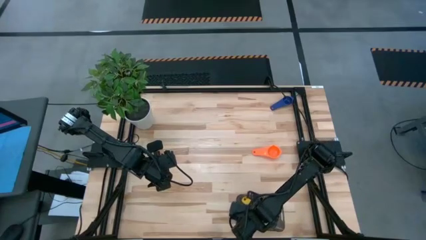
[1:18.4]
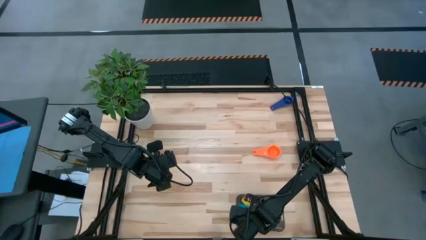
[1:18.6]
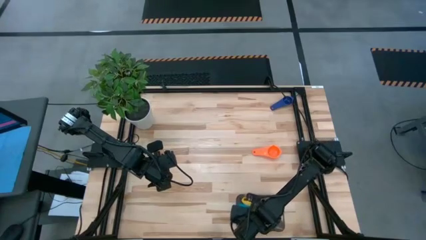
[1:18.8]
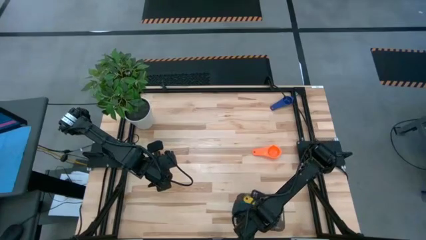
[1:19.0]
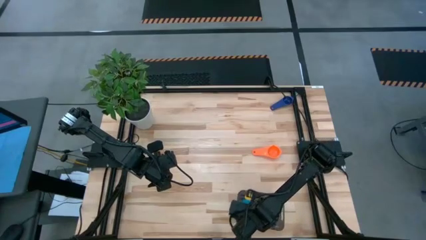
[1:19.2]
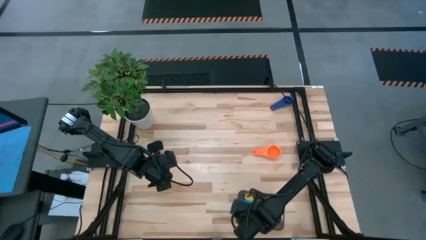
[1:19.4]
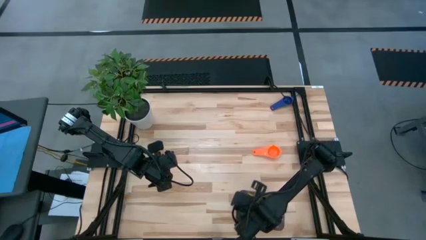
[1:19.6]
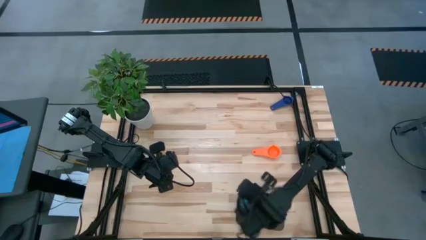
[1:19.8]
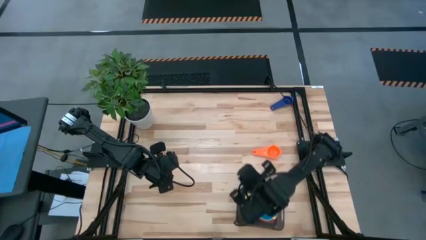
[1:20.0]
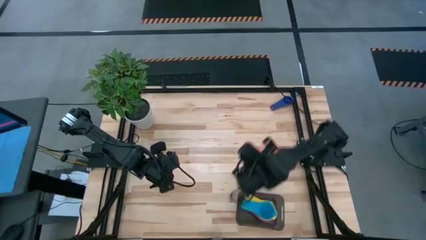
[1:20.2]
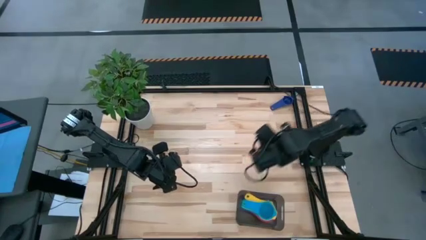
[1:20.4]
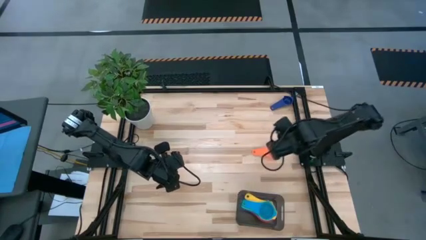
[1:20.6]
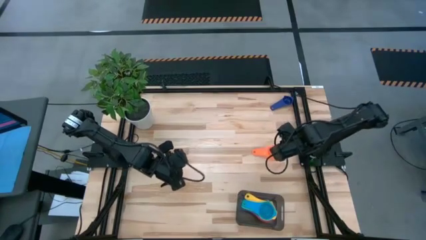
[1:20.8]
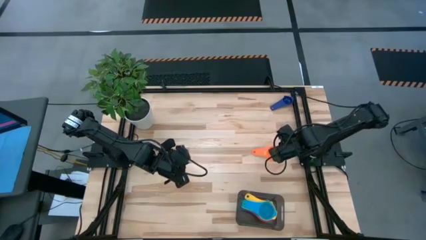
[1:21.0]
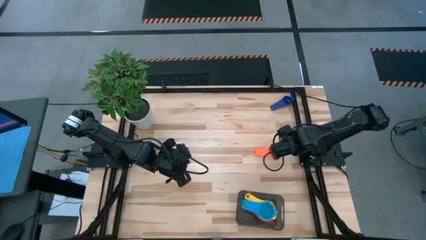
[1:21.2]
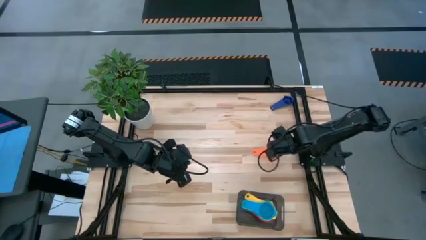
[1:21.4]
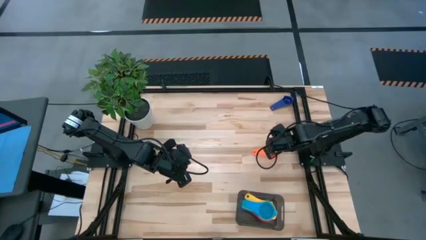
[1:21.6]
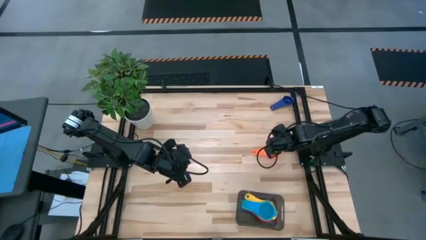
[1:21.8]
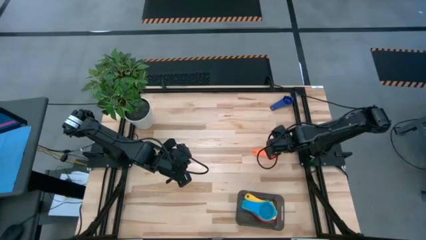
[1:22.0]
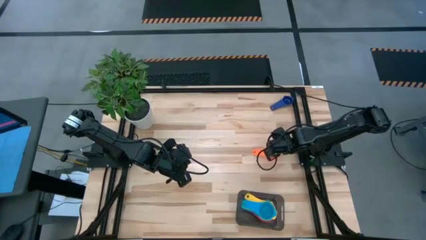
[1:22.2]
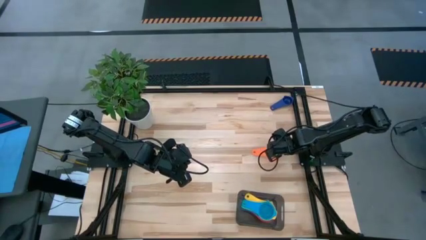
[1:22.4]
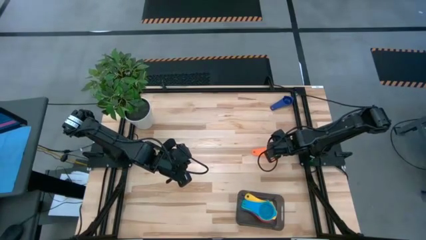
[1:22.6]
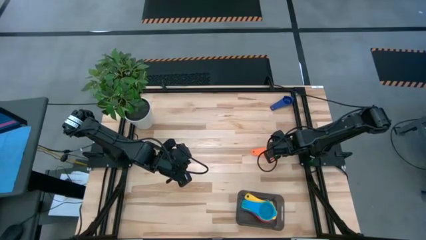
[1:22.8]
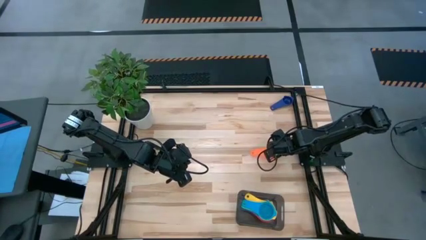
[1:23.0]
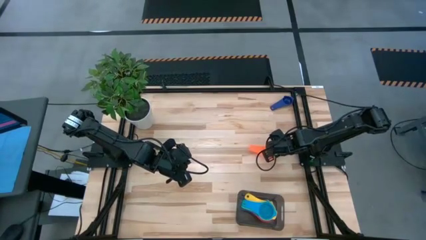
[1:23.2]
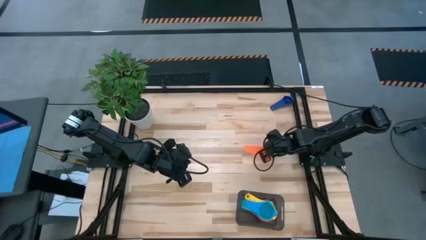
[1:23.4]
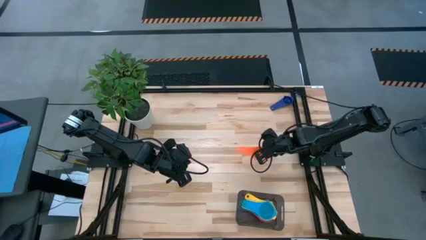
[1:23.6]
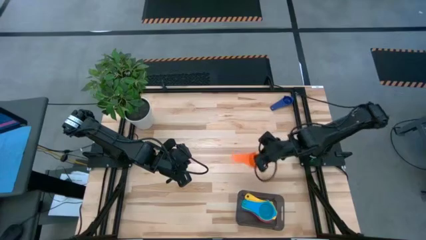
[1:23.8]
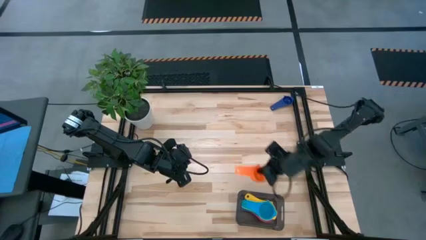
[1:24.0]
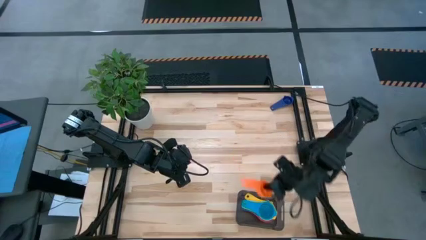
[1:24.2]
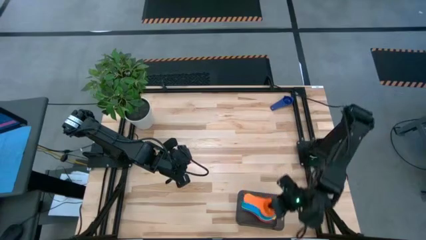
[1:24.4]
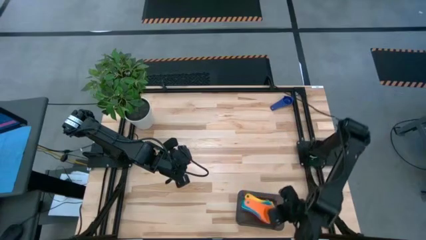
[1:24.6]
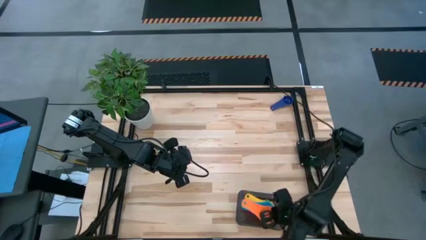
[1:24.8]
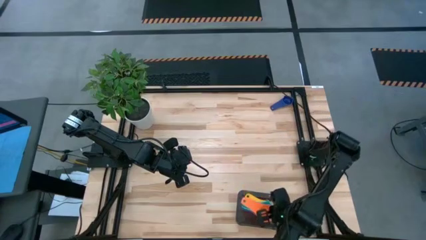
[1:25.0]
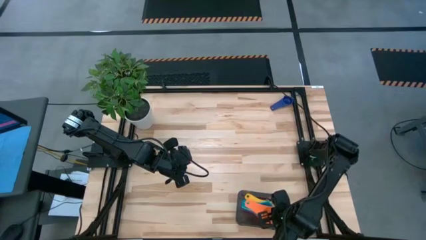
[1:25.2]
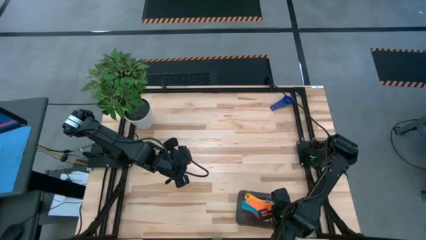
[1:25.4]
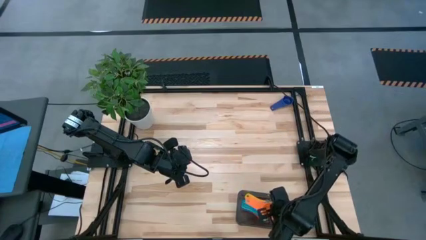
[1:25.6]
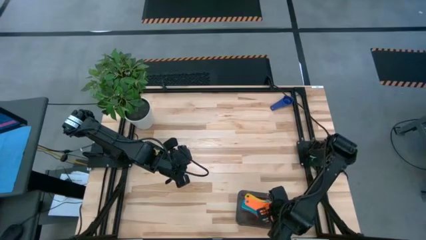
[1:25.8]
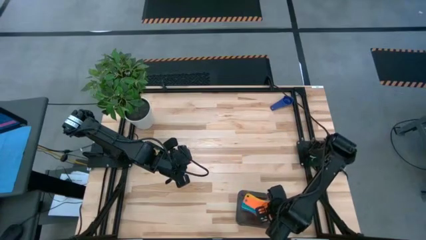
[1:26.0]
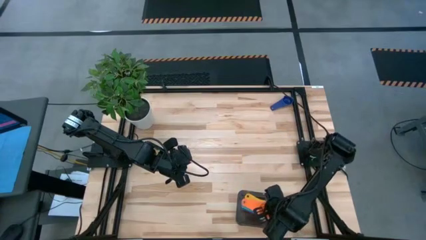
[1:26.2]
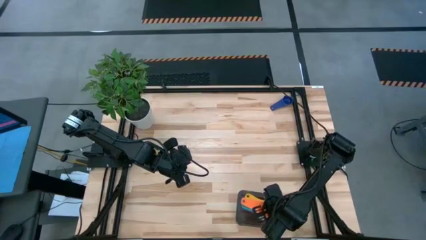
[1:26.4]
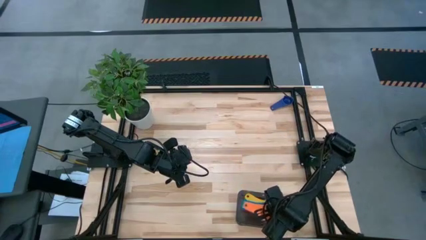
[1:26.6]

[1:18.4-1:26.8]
Task: Nest measuring cups in basket
Stack the orange measuring cup on top of the light blue measuring cup in the black bin

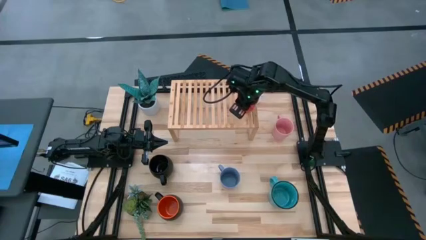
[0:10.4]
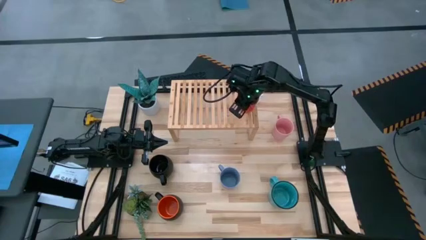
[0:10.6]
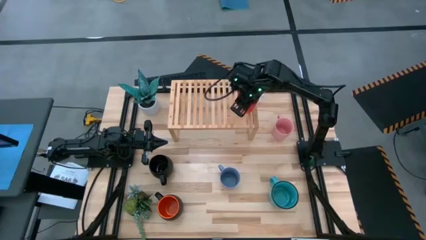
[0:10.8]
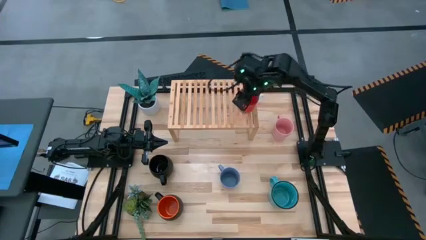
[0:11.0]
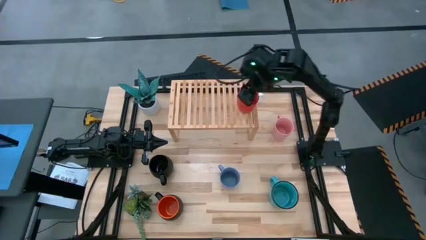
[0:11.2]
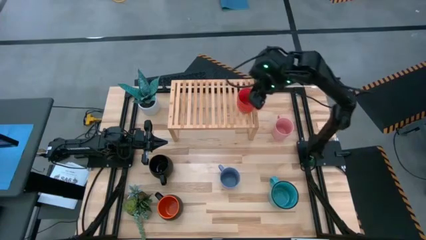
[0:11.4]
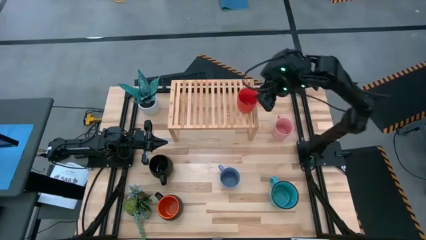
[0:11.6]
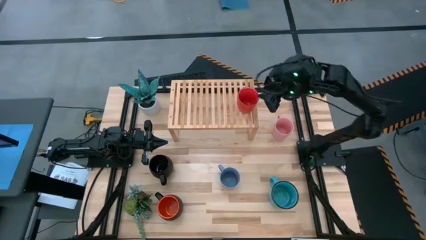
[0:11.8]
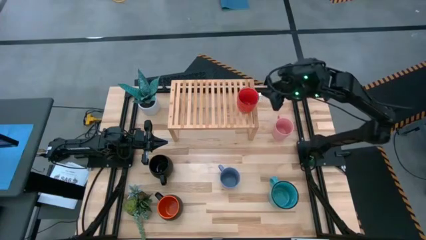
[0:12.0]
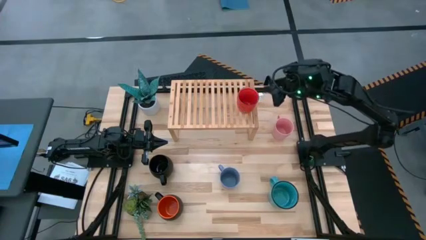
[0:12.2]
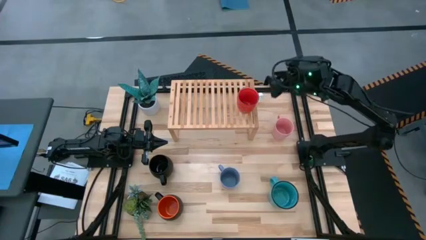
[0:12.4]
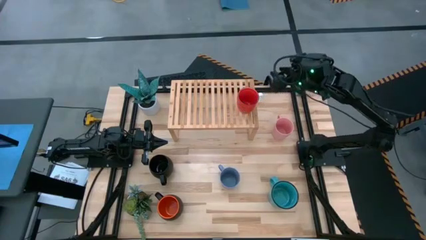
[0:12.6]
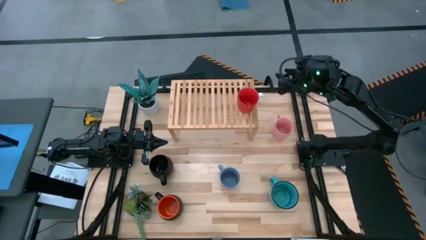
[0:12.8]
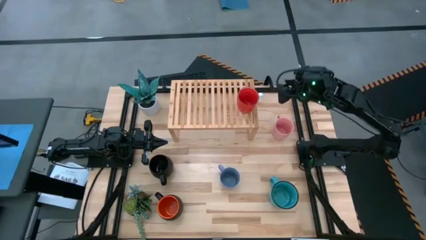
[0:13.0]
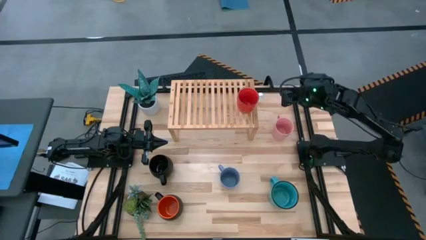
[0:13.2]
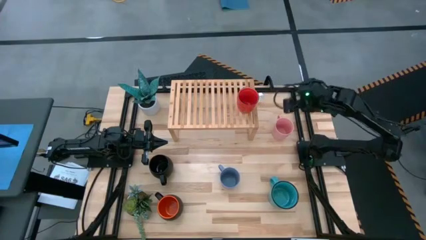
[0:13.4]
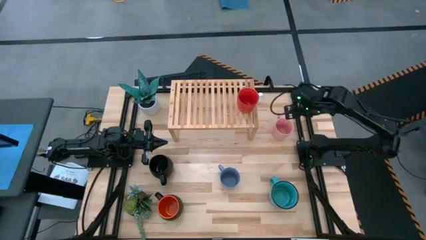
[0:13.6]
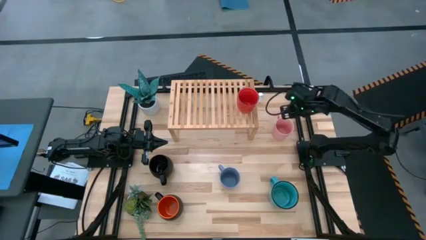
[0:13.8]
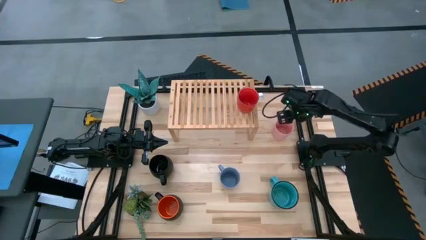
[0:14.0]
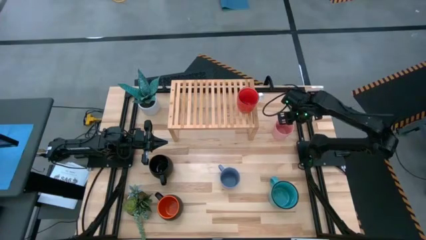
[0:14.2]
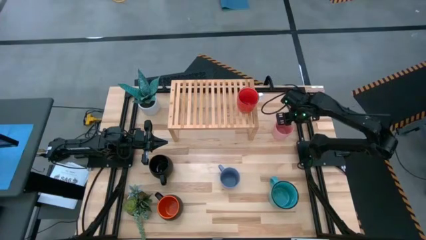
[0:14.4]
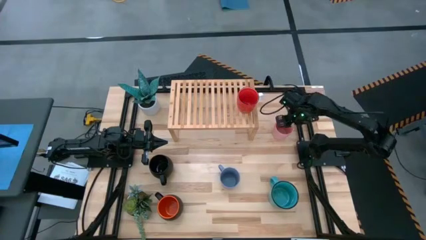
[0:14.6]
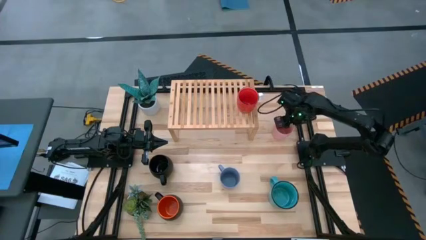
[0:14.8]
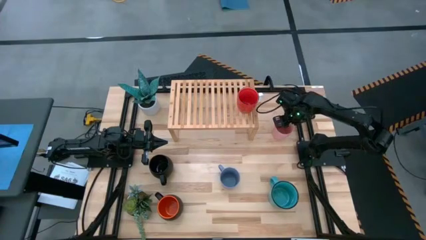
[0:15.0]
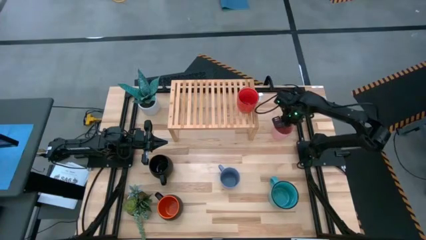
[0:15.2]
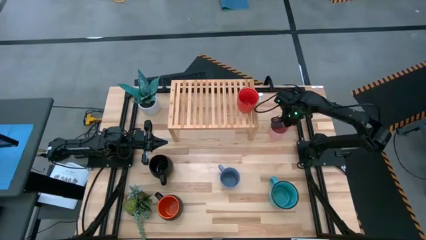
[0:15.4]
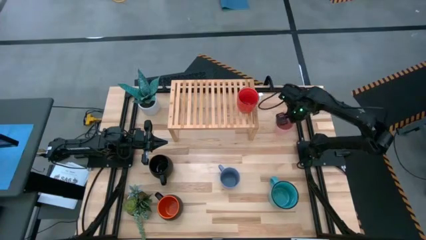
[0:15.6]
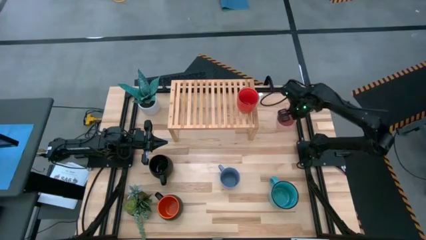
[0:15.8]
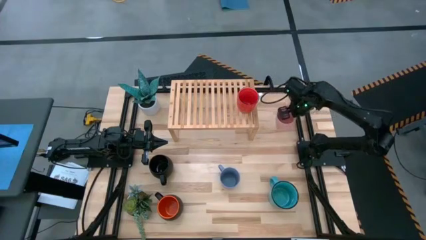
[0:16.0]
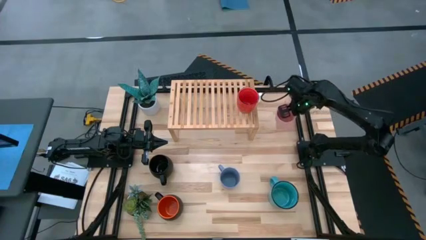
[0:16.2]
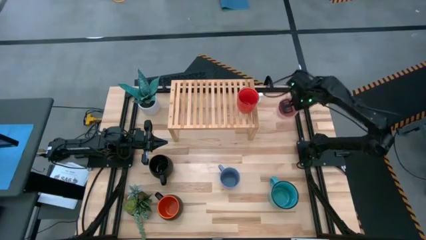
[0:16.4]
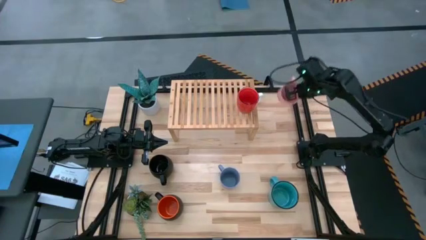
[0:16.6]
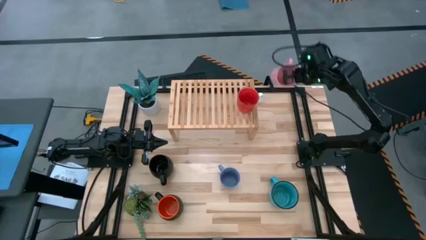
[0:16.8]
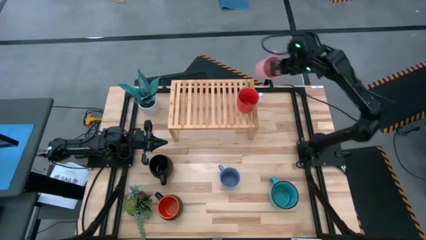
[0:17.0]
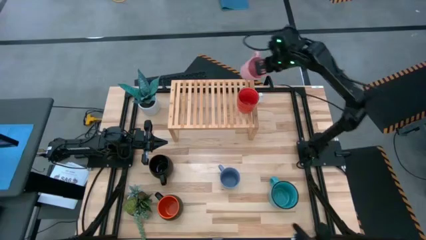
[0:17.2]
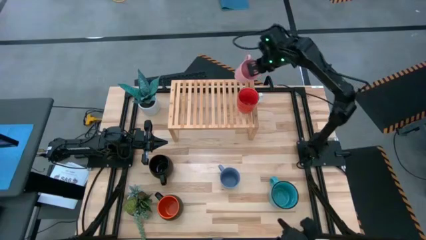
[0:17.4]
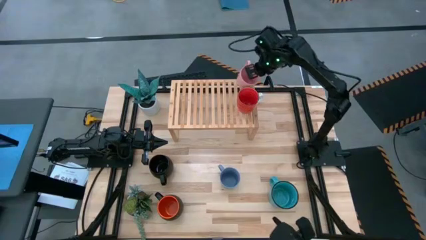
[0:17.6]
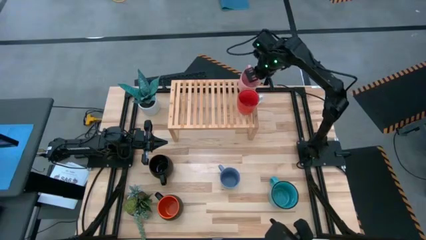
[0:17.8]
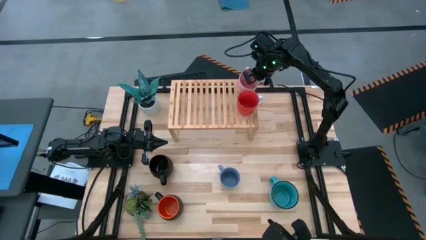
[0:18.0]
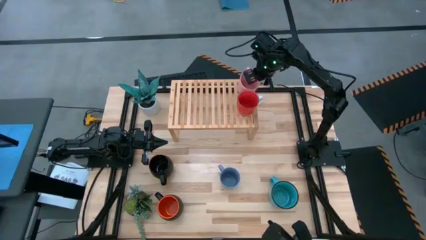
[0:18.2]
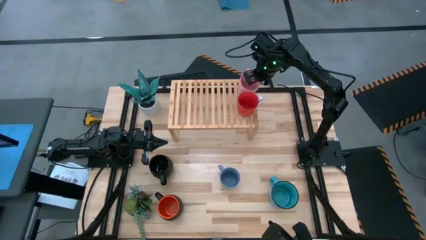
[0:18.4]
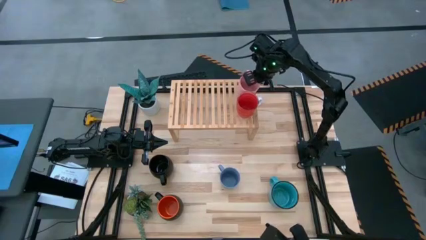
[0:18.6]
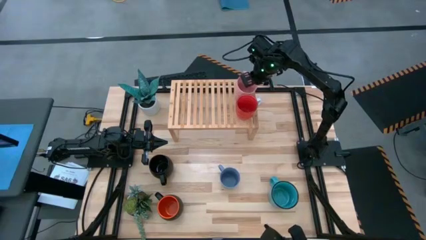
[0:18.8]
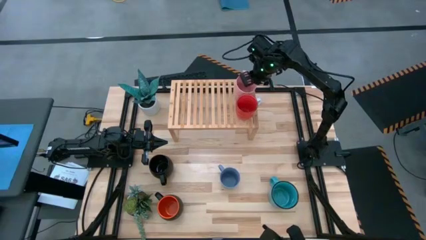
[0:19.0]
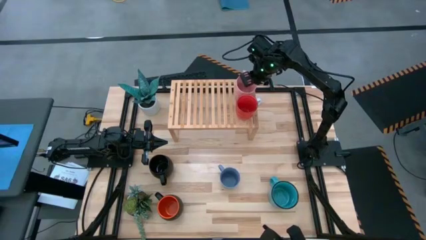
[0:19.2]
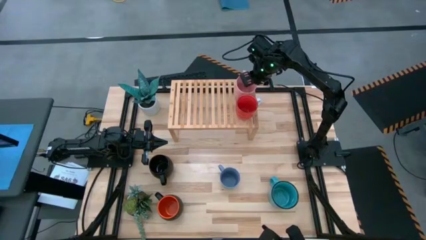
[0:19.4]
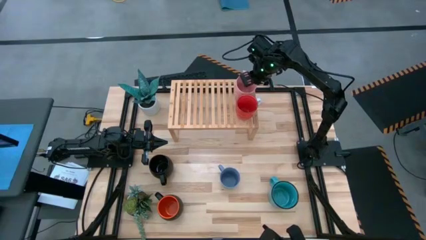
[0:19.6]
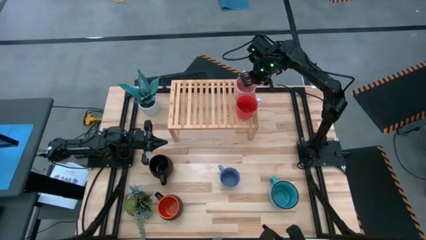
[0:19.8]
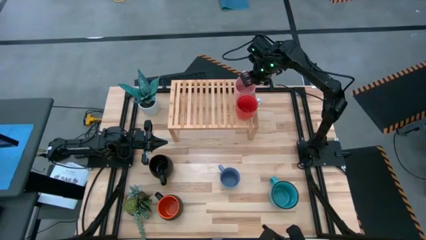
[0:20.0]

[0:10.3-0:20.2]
Task: Place coffee mugs
Put the pink mug on the shelf
